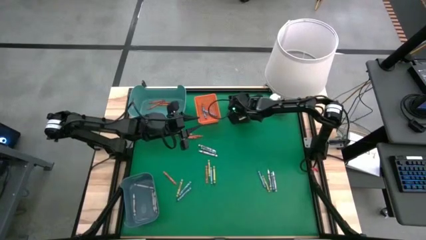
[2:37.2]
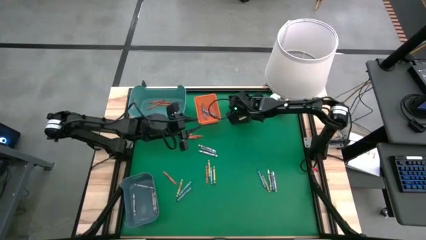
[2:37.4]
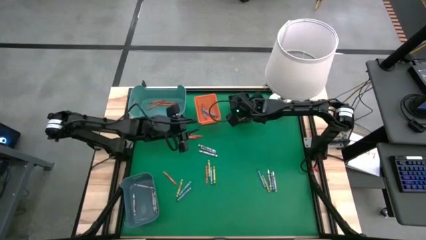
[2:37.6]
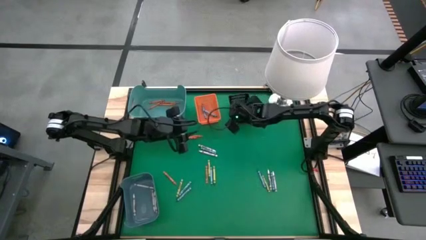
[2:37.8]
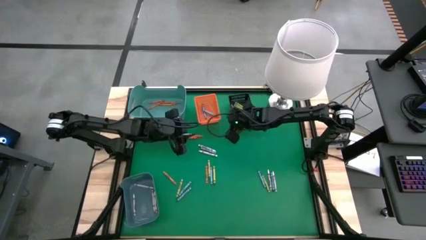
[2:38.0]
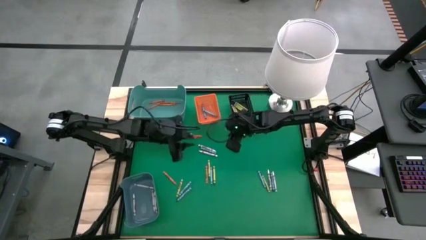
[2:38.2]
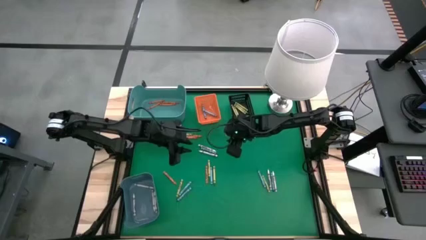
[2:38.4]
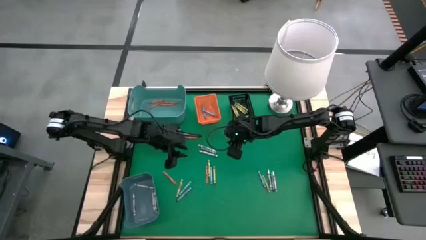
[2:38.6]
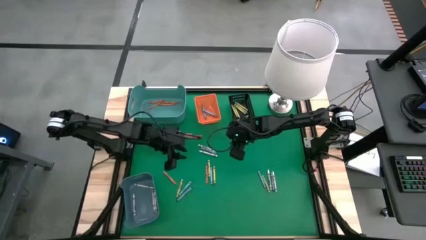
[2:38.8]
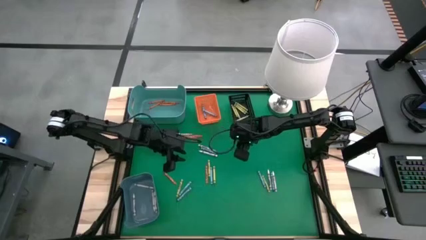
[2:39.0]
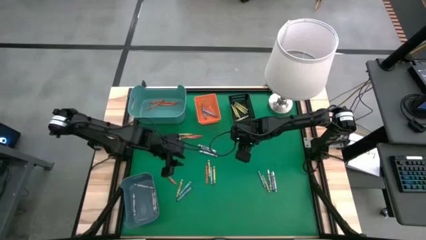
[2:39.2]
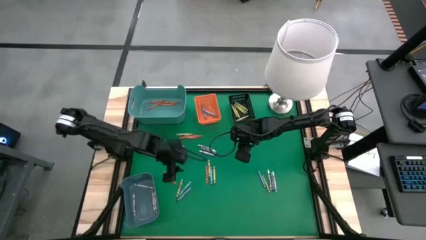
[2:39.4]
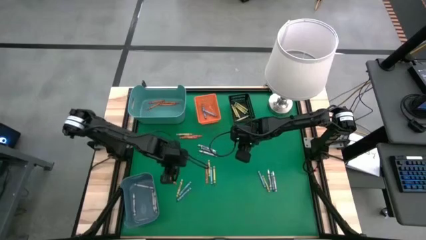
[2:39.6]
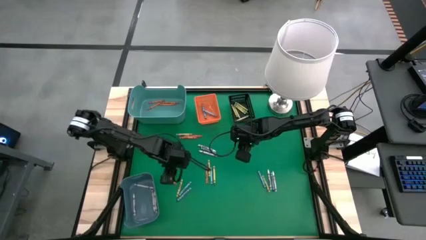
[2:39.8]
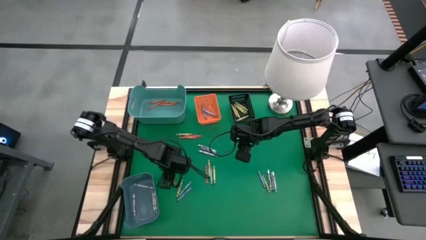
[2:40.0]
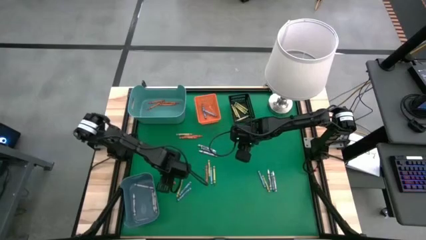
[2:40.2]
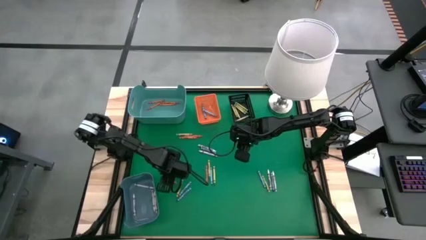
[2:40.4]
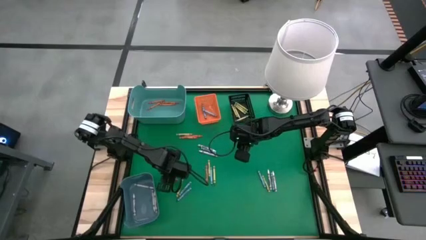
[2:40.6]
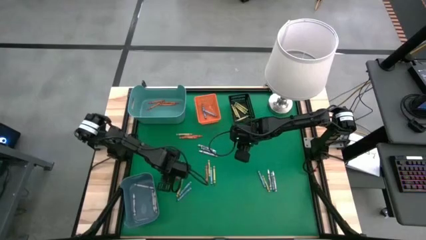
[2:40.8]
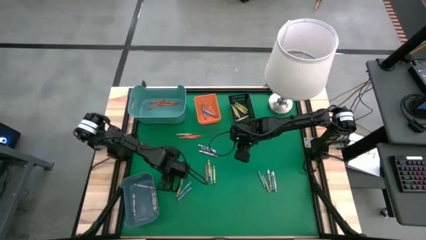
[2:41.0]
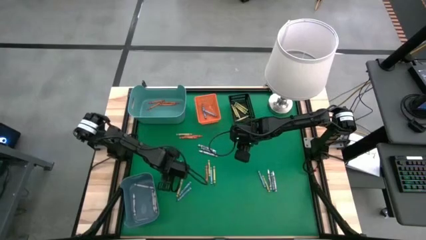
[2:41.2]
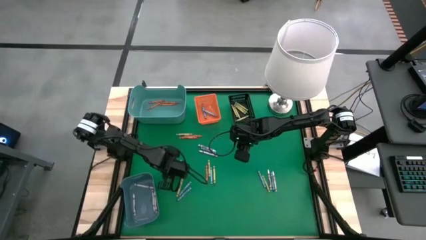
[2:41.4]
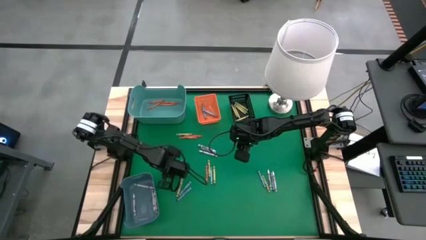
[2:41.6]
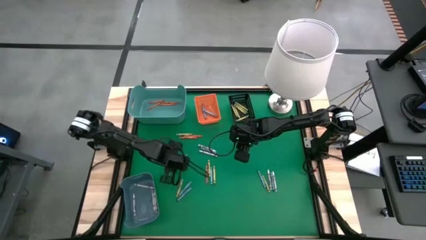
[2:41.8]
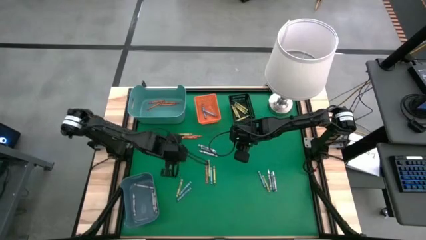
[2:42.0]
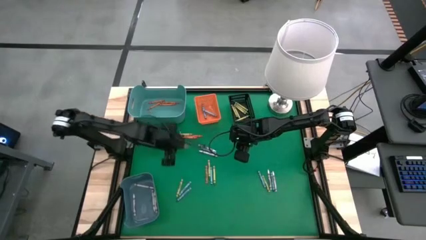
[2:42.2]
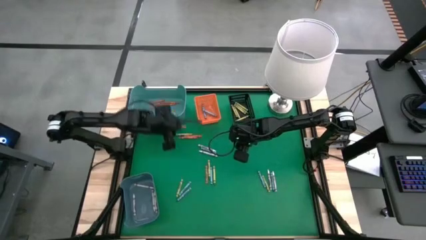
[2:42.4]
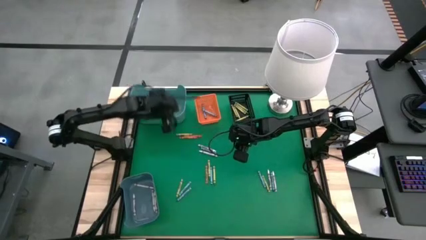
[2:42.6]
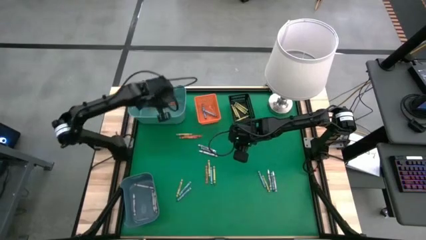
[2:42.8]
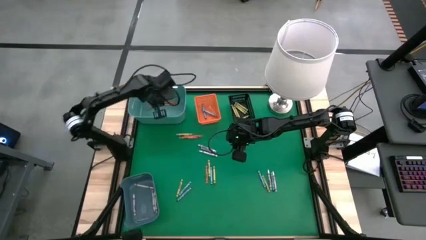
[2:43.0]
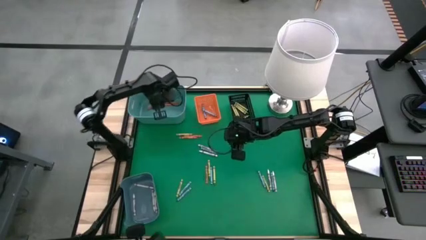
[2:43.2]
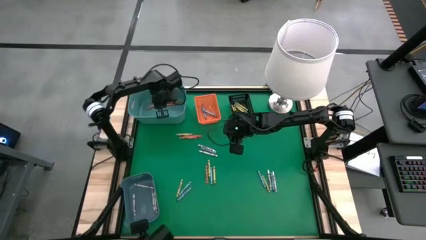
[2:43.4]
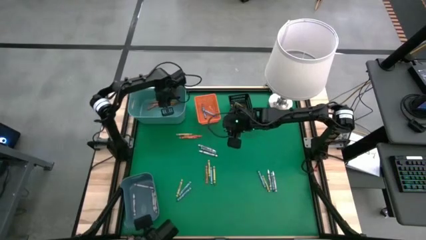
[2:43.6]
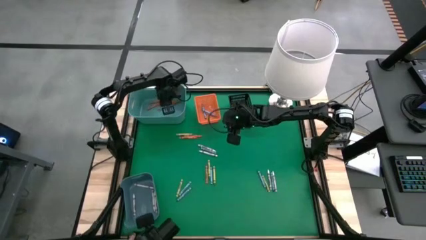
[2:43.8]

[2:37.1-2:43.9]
Task: Sort crayons
Put the orange crayon into the green bin

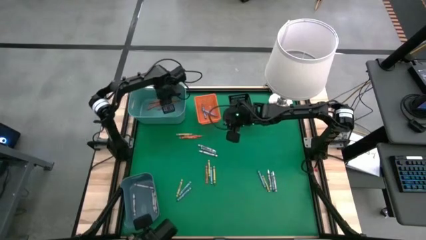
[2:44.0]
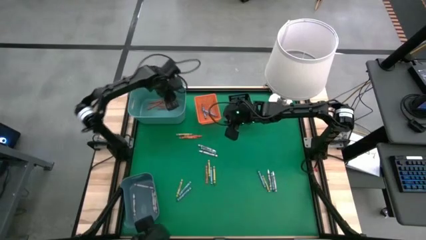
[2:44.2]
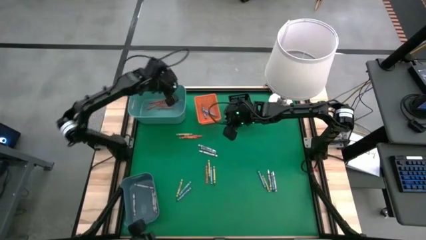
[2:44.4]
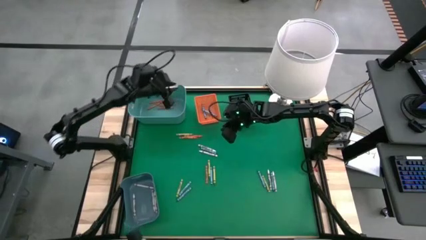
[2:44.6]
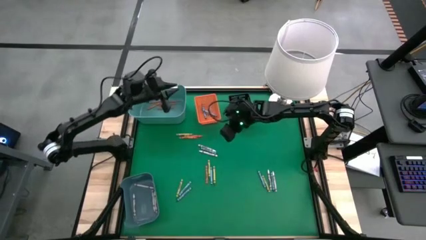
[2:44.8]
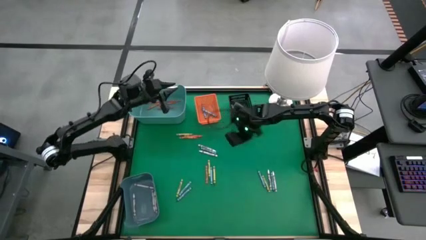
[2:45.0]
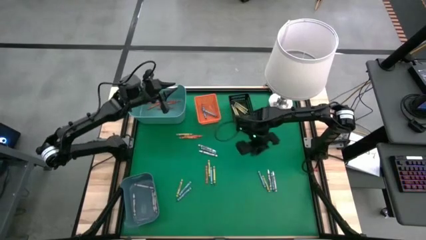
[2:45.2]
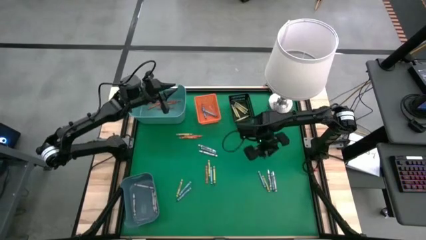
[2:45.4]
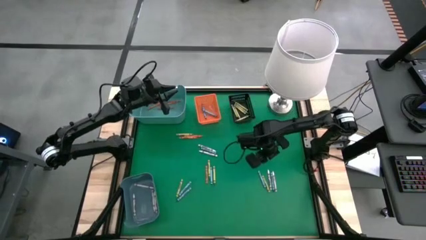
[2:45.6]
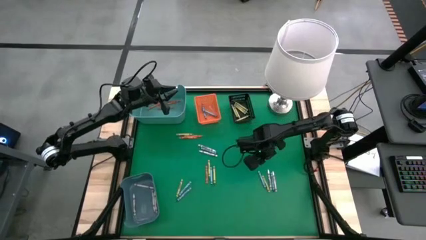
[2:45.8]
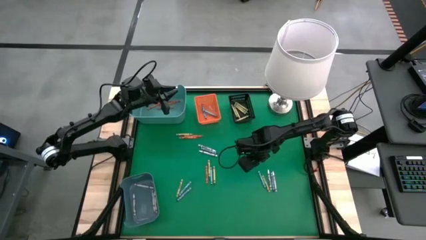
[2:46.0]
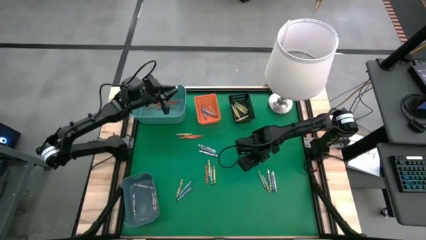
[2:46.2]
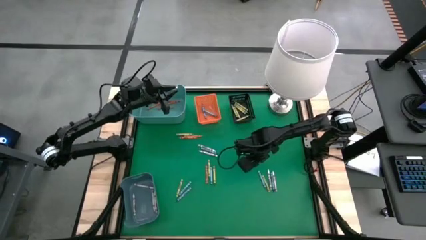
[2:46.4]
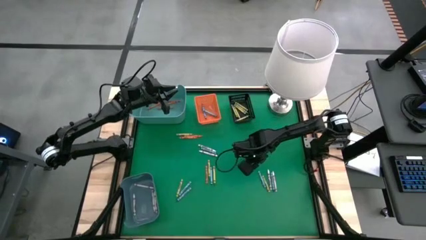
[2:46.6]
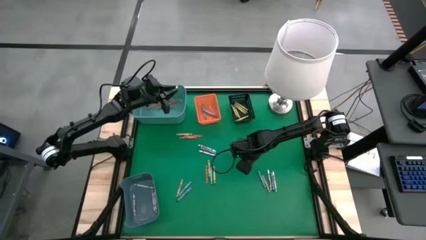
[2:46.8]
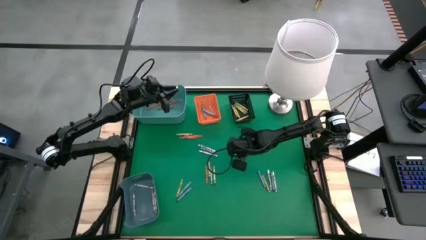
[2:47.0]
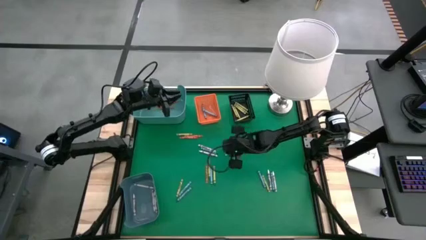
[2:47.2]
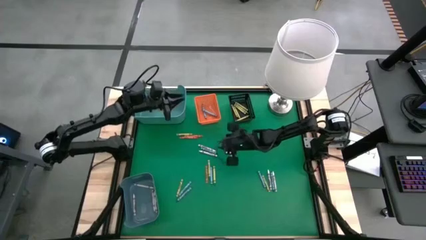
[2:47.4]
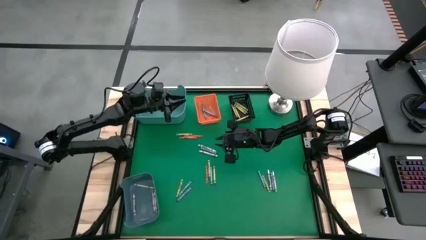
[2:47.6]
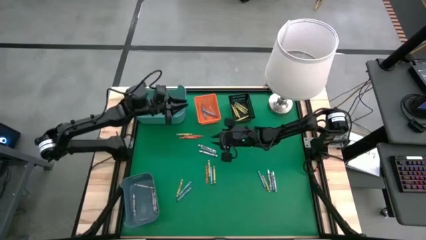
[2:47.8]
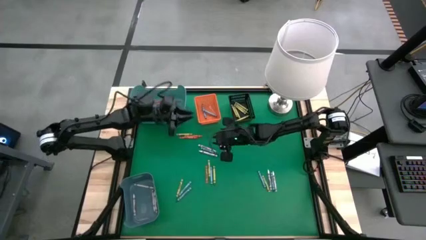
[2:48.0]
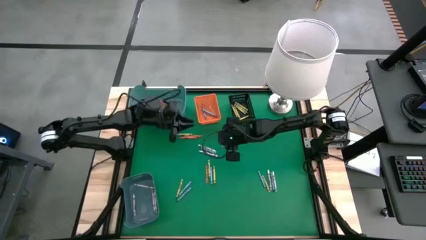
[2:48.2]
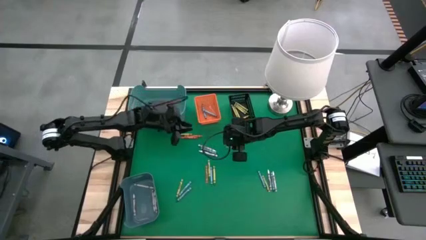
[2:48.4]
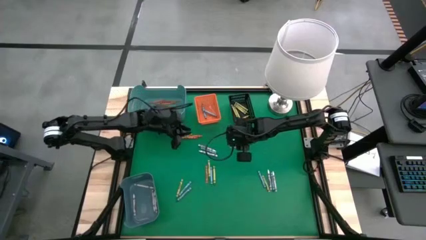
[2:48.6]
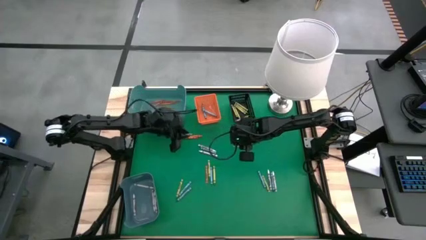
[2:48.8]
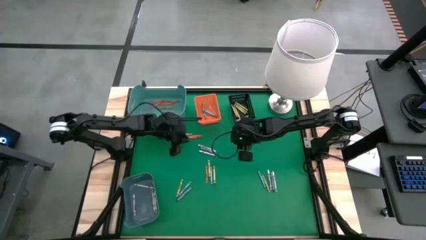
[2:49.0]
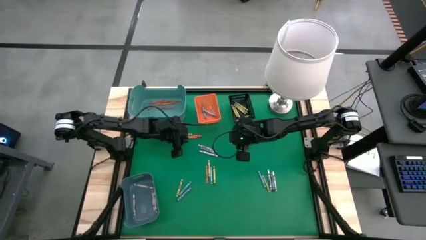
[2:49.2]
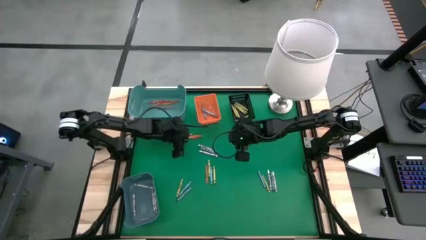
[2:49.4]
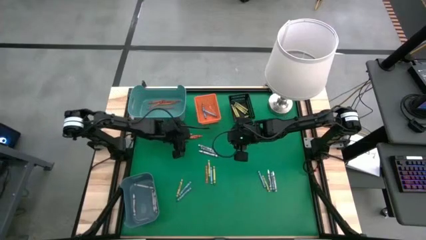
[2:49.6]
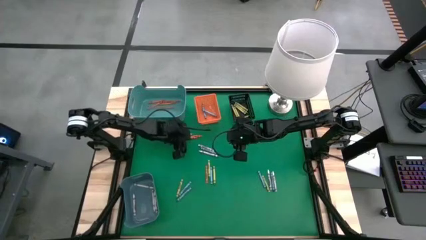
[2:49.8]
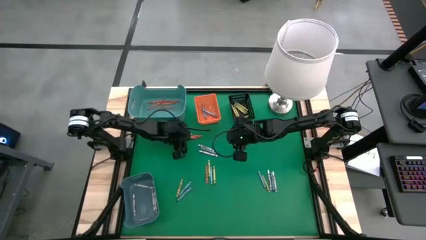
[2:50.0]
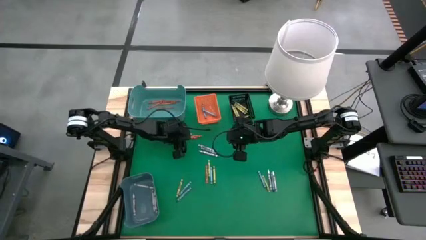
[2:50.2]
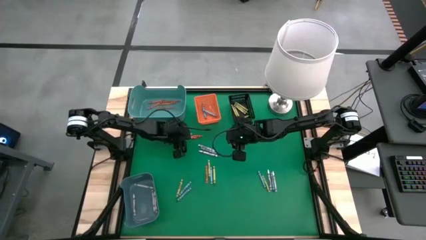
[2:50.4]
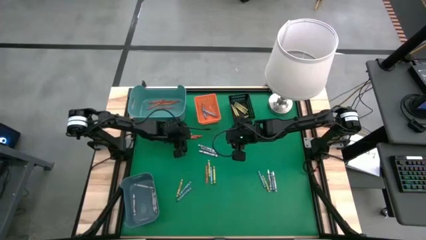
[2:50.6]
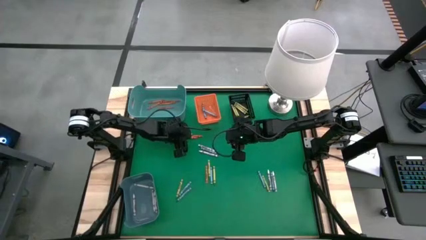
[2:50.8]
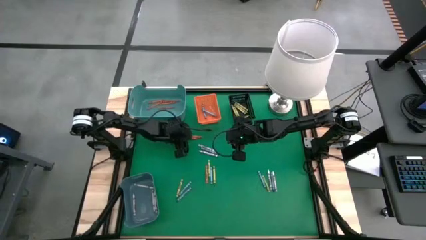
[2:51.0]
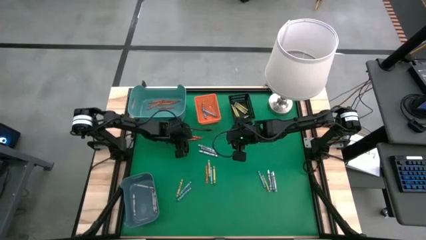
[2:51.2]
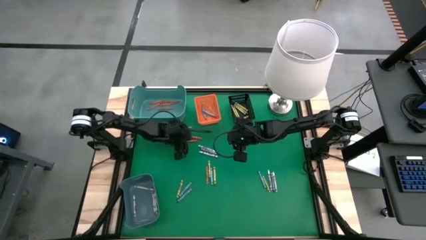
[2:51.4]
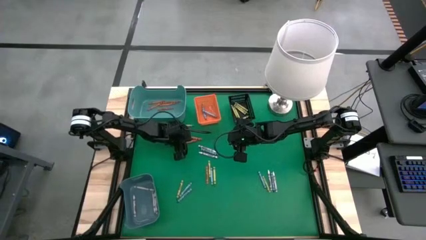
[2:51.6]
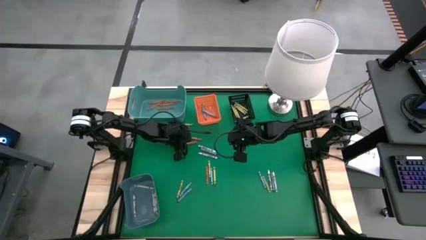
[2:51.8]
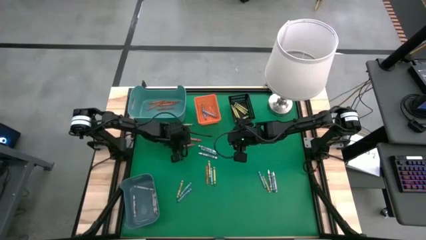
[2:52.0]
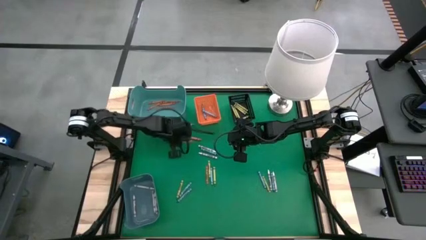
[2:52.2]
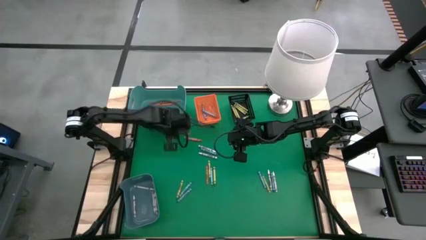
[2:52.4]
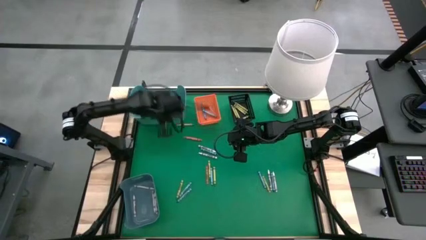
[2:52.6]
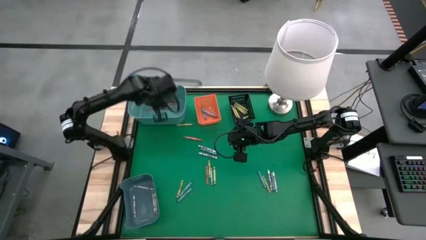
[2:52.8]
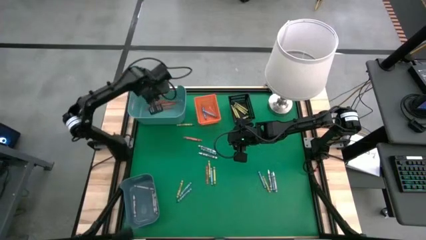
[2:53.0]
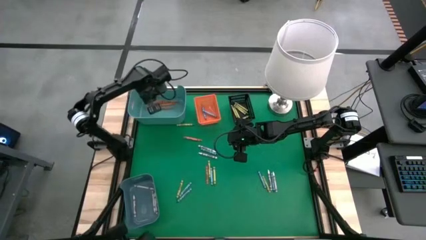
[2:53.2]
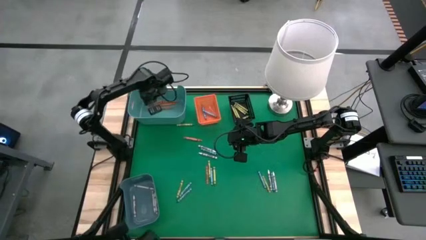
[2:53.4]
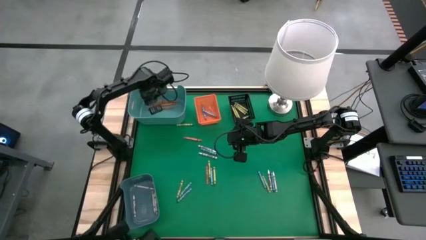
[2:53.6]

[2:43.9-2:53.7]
Put the orange crayon into the green bin
